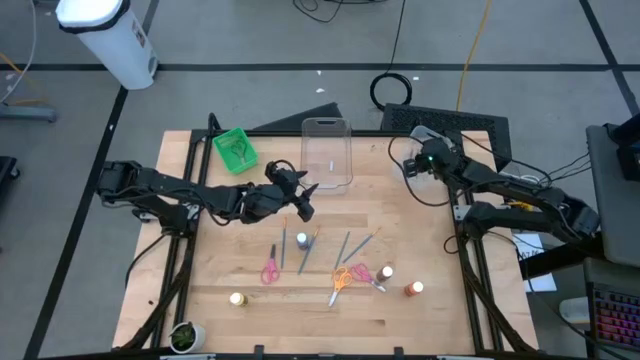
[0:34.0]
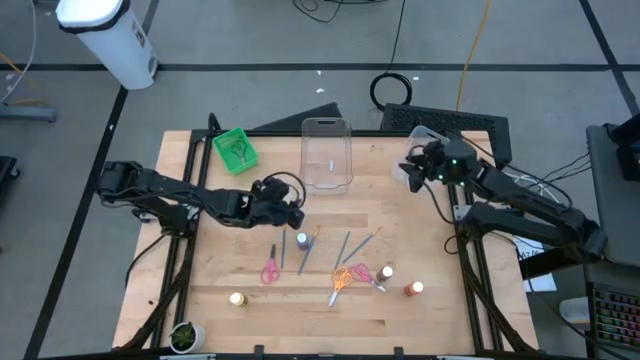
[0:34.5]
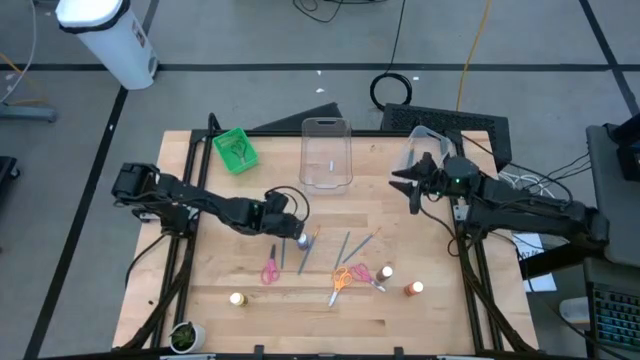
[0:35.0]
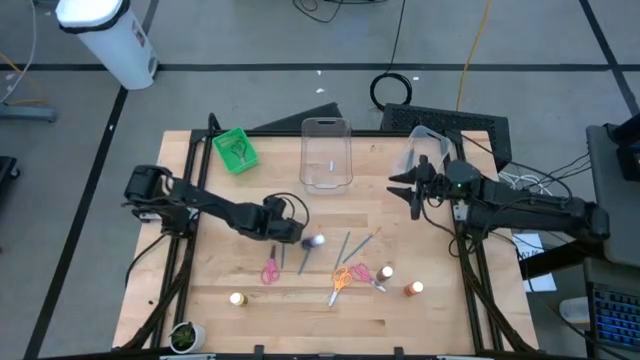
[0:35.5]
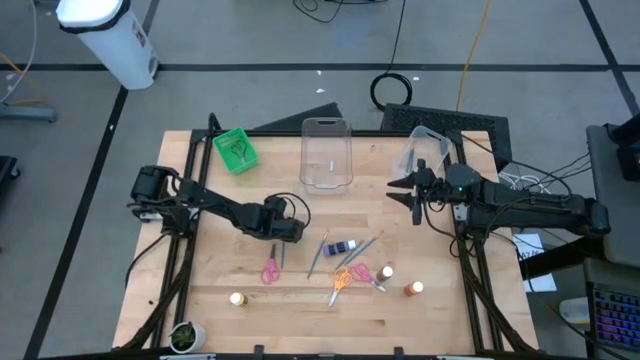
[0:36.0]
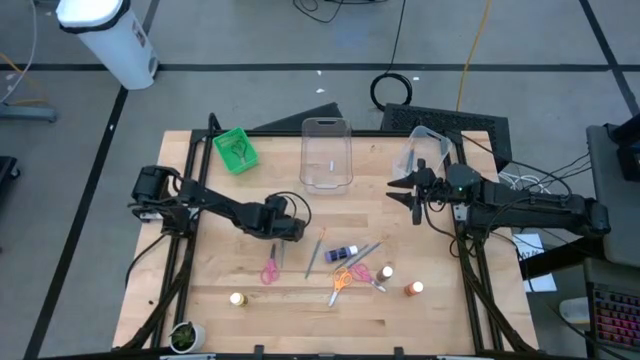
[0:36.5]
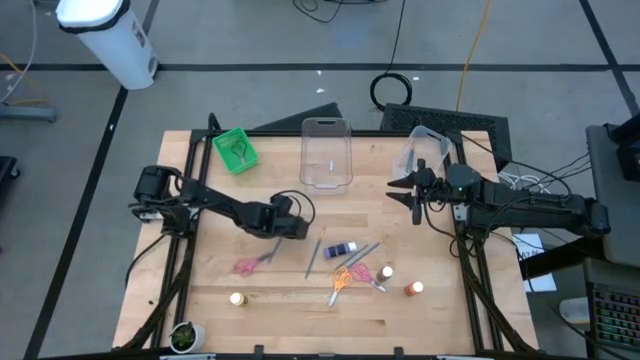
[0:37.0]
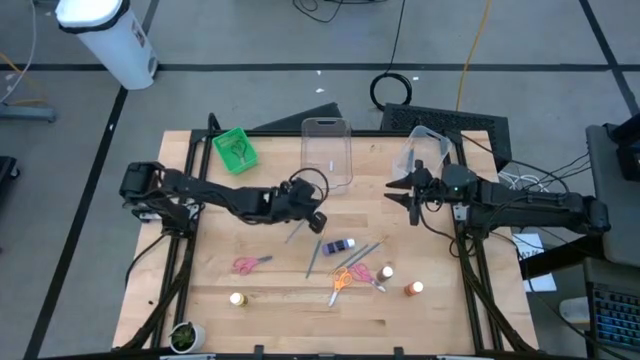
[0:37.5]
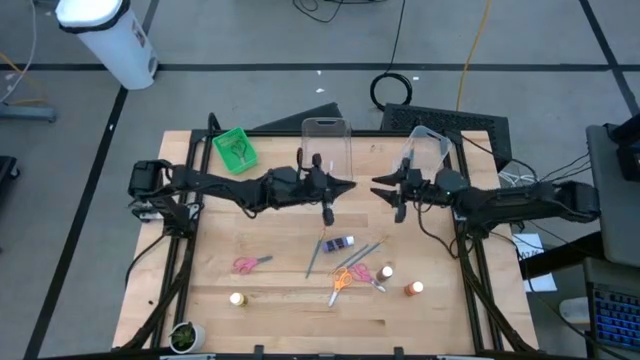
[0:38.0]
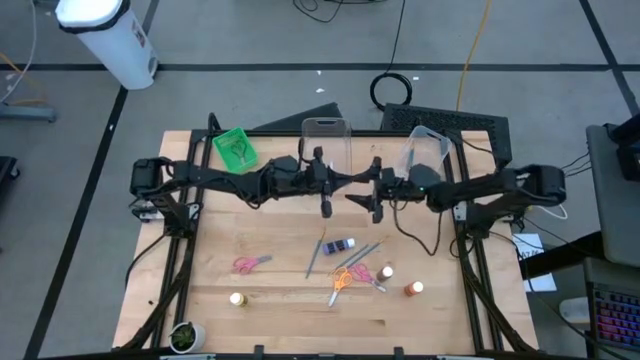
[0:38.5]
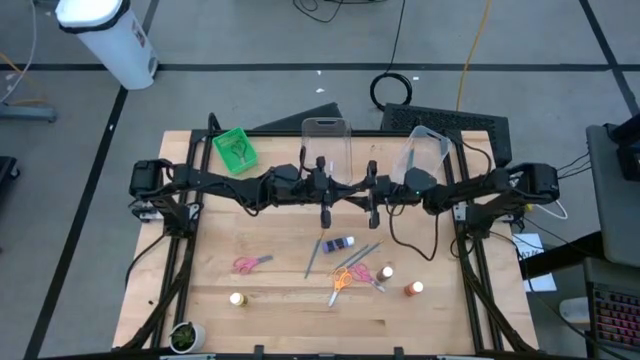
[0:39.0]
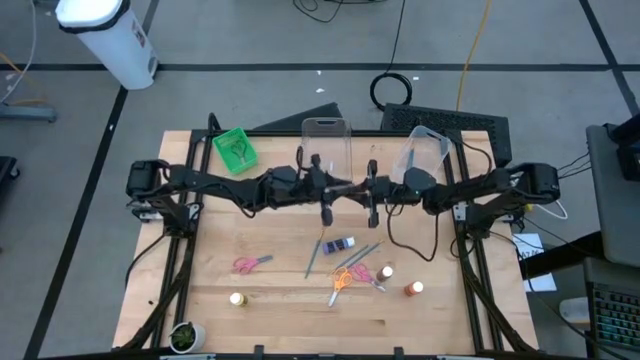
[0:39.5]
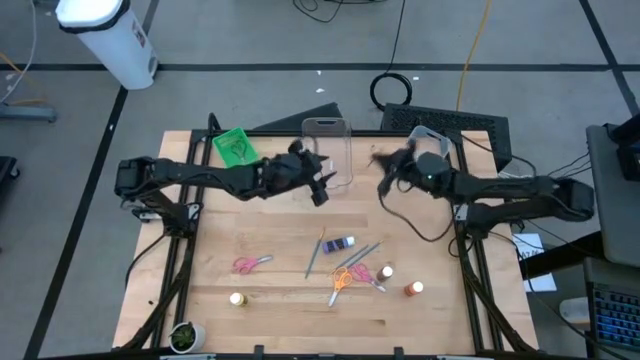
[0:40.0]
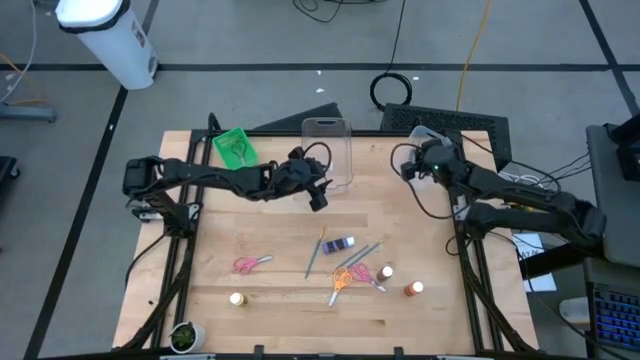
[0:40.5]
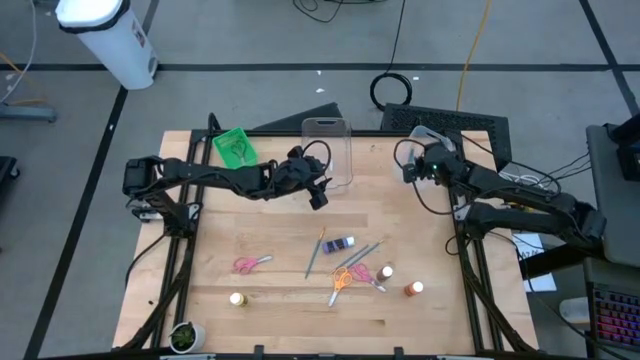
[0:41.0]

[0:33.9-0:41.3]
Task: Pick & Place Paint Supplies
Put the blue paint brush into the white bin

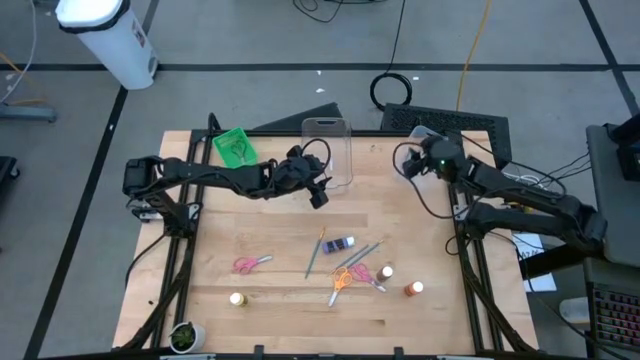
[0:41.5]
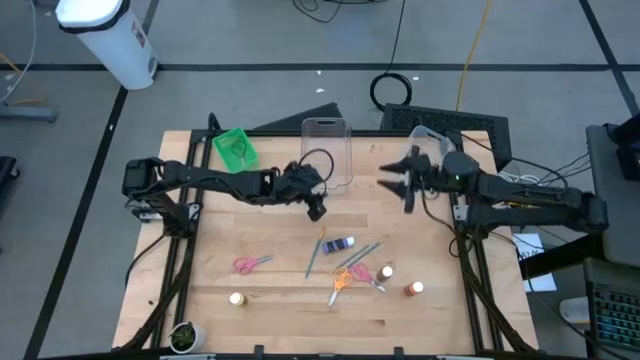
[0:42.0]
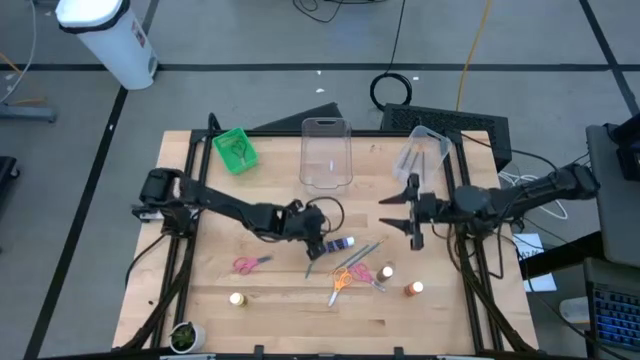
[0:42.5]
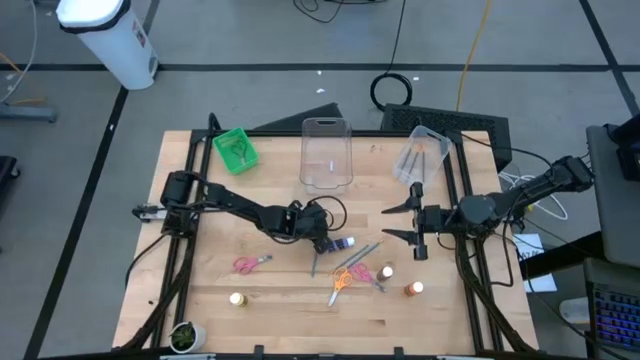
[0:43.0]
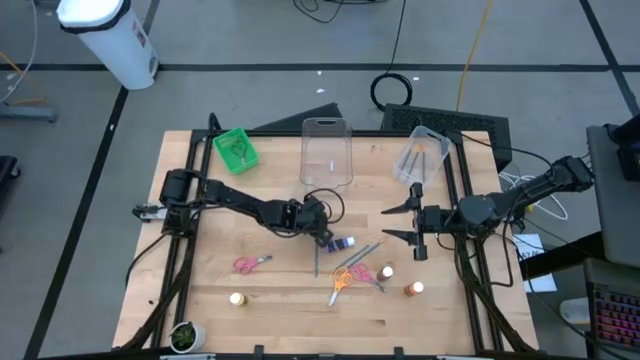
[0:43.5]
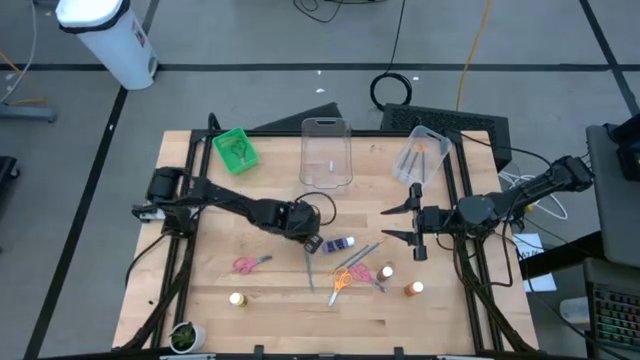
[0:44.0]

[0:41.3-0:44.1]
Put the blue paint brush into the white bin

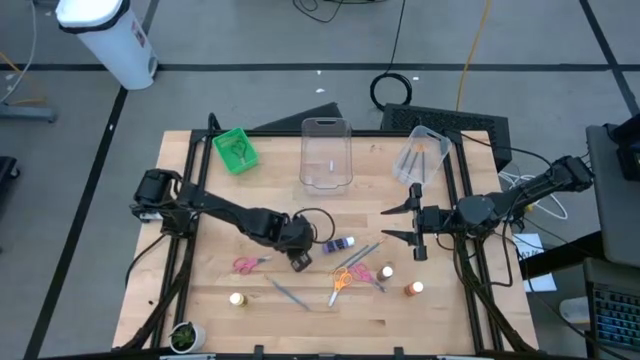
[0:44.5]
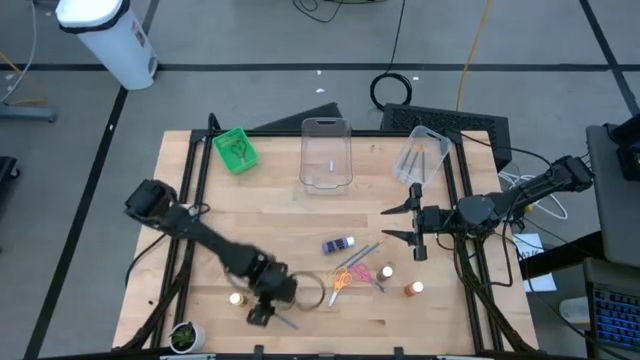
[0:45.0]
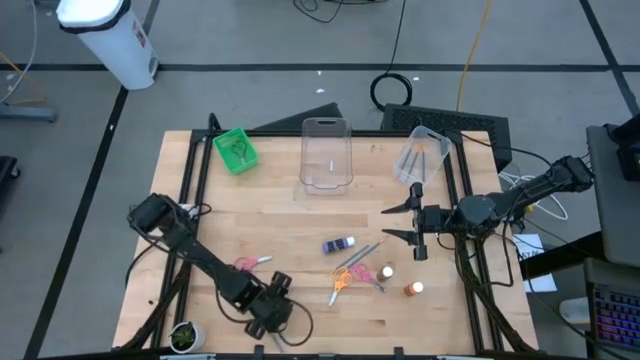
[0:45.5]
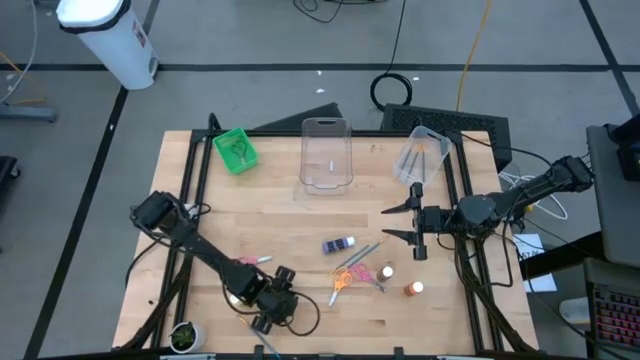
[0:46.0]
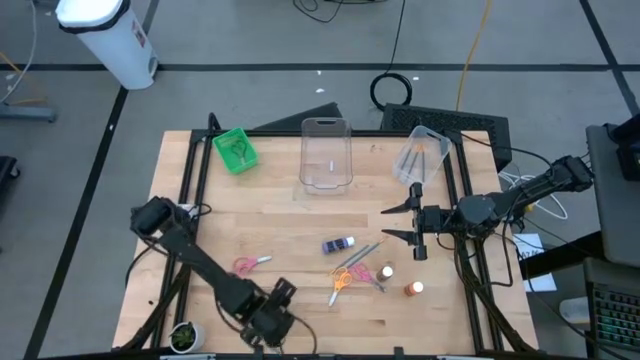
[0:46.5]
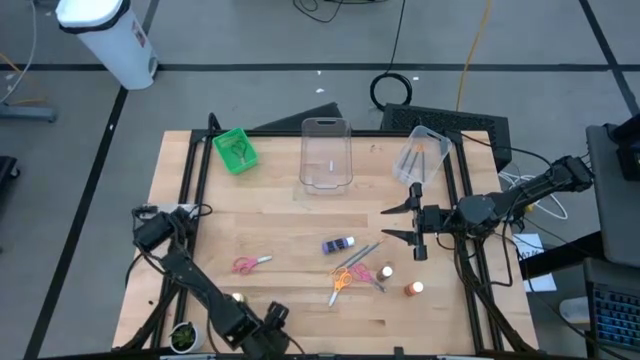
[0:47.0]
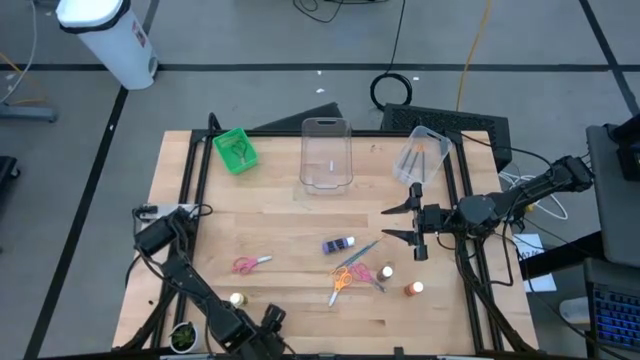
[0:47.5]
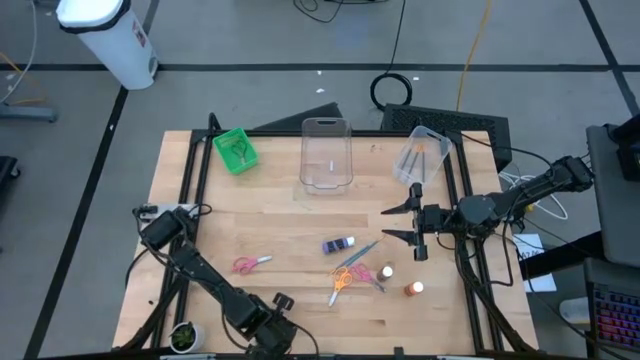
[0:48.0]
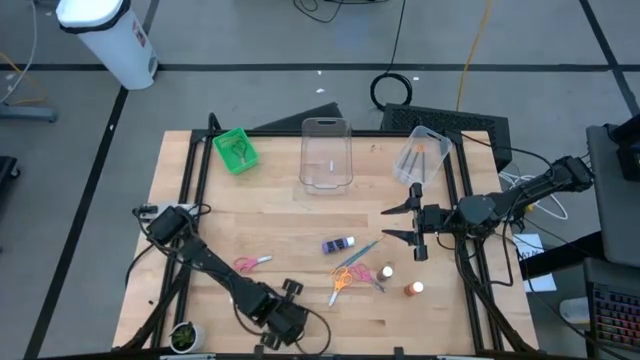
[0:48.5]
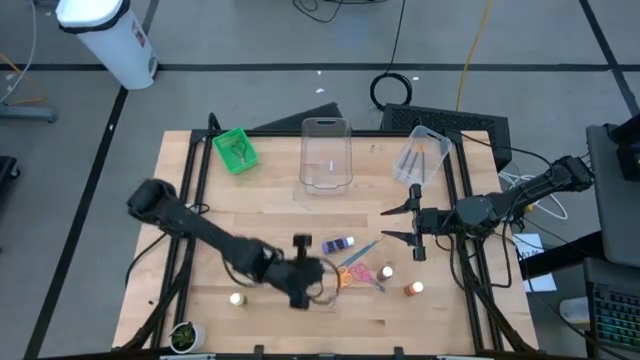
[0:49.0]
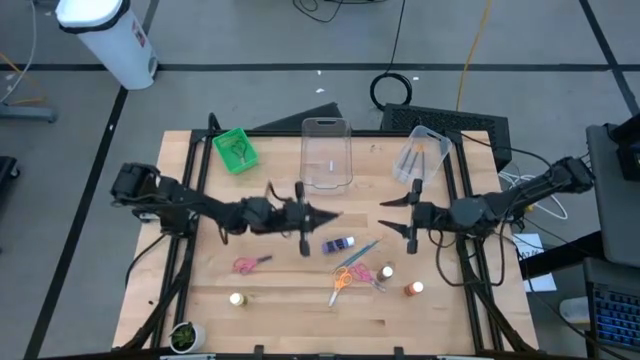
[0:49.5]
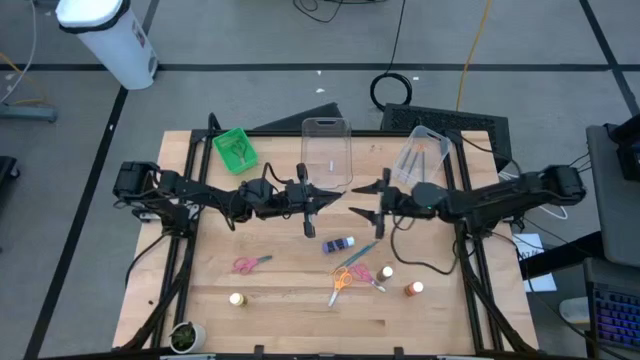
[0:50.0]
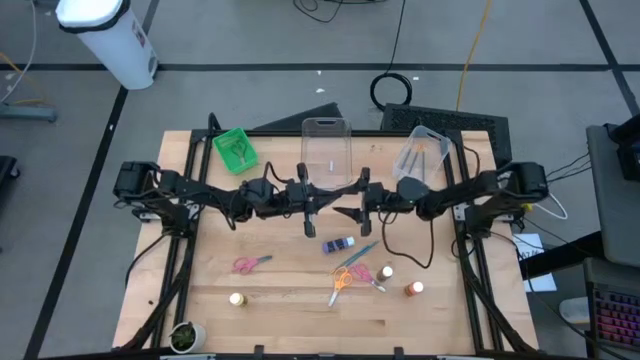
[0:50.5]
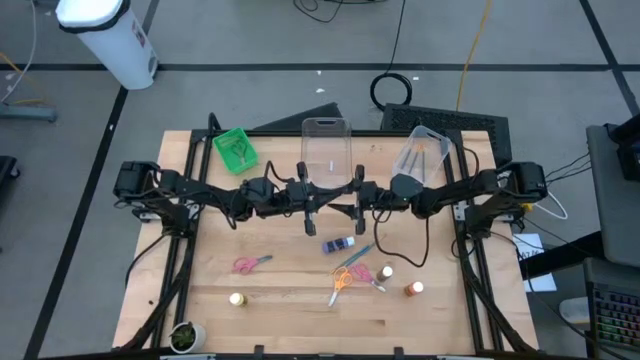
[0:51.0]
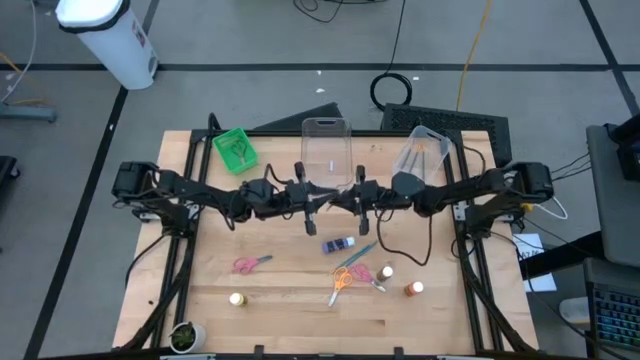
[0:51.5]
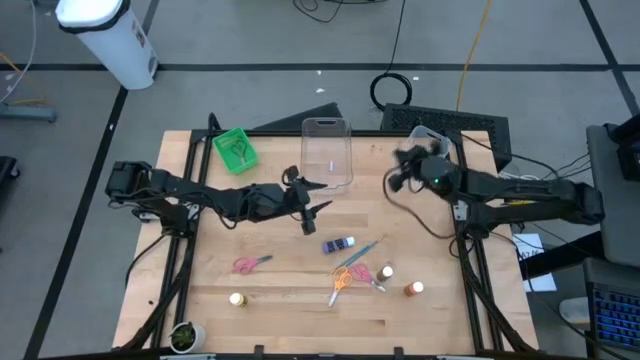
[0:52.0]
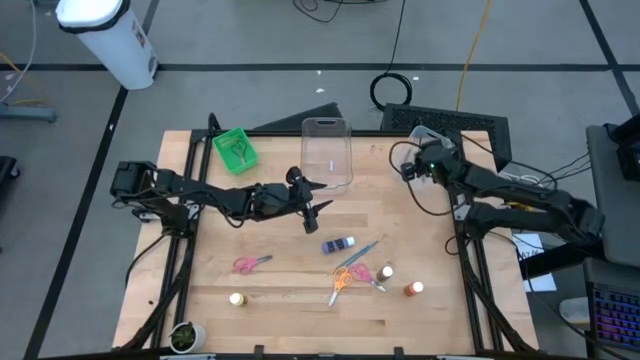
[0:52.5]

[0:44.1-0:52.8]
Put the blue paint brush into the white bin

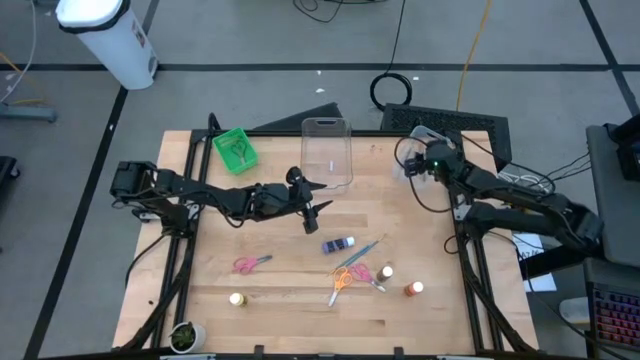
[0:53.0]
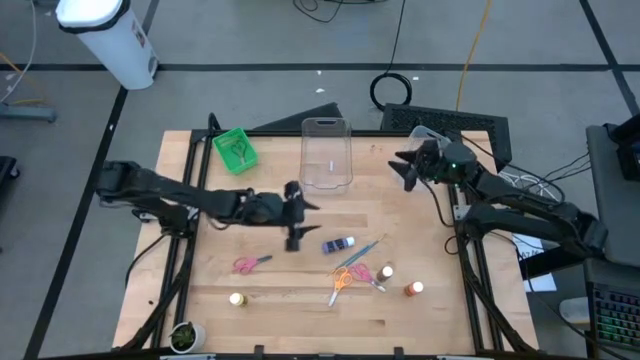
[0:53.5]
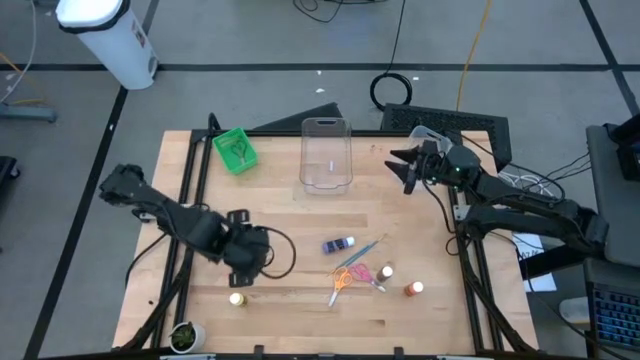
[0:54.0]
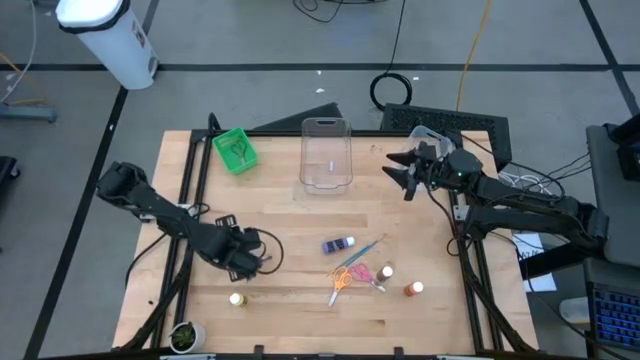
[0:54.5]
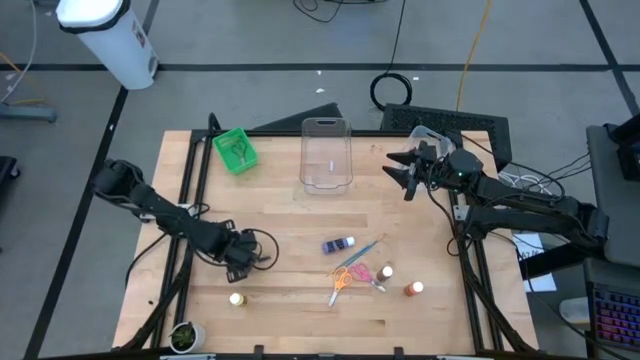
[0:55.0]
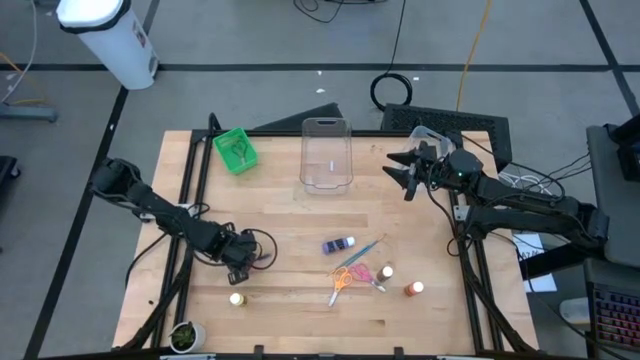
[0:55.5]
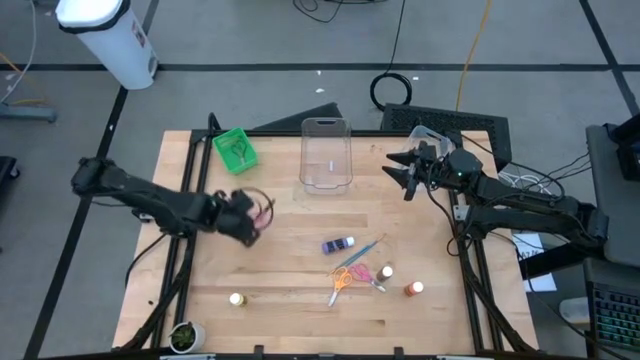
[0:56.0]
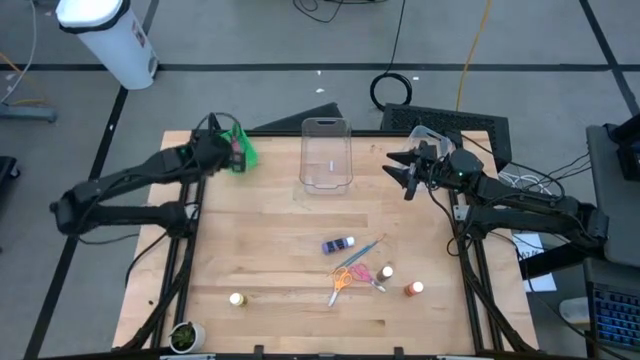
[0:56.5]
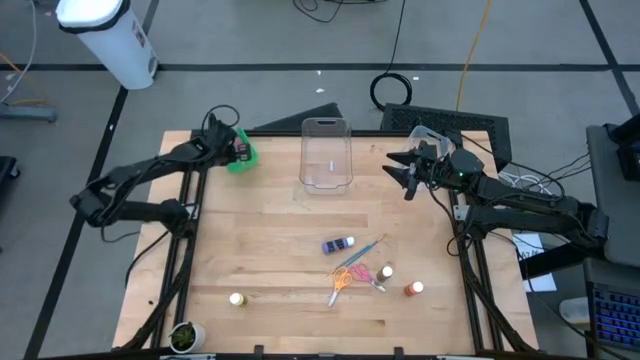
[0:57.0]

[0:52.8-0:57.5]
Put the pink scissor into the green bin
